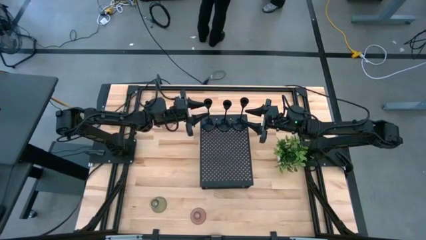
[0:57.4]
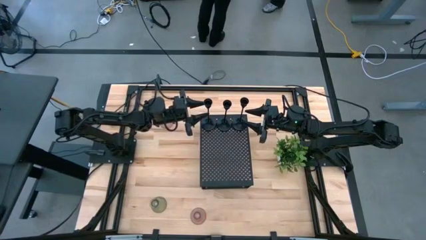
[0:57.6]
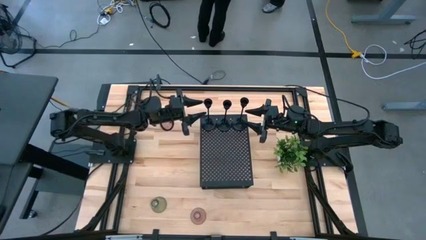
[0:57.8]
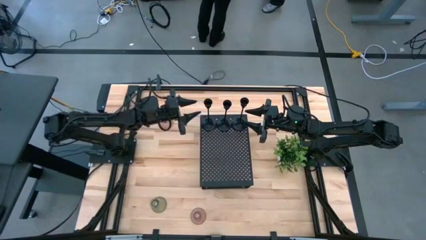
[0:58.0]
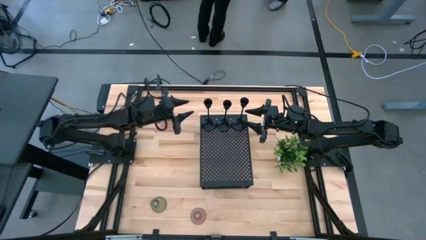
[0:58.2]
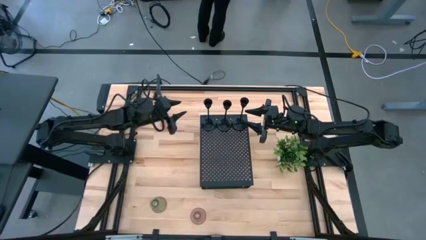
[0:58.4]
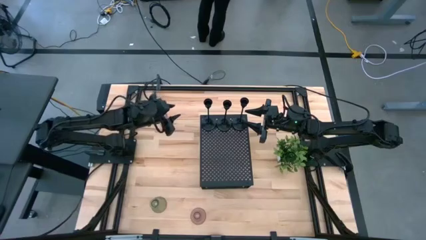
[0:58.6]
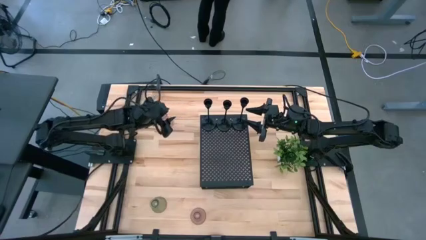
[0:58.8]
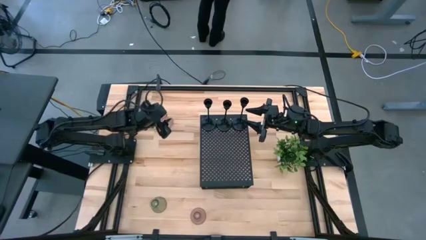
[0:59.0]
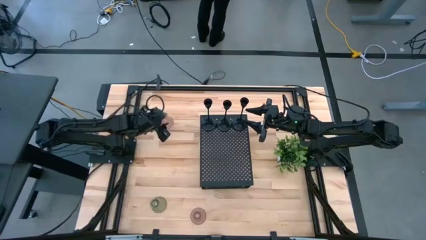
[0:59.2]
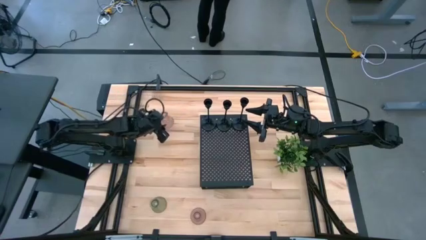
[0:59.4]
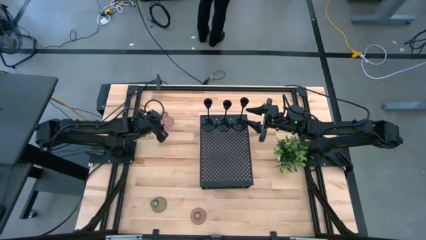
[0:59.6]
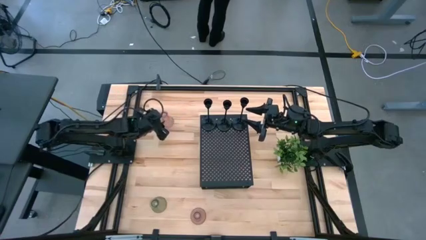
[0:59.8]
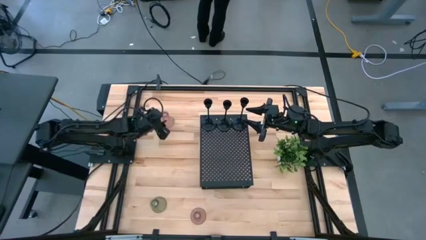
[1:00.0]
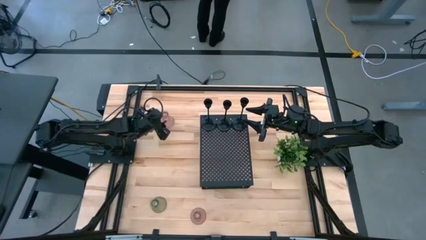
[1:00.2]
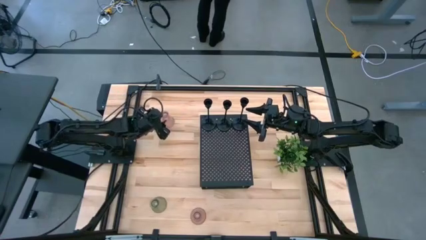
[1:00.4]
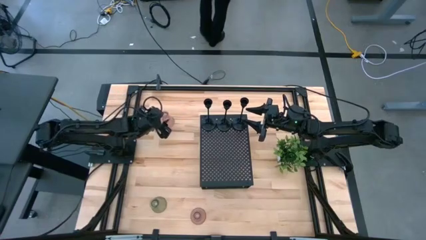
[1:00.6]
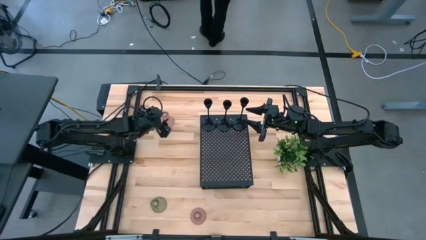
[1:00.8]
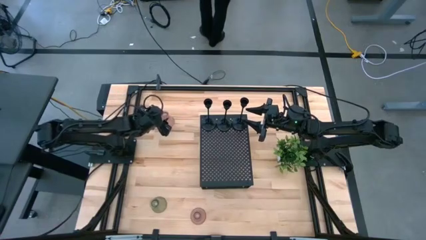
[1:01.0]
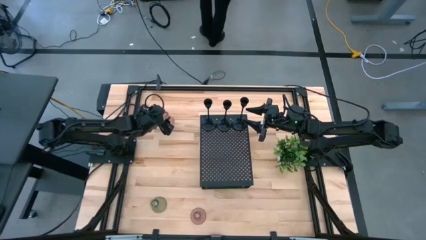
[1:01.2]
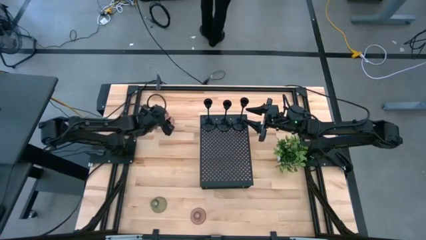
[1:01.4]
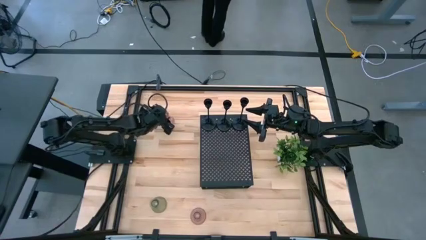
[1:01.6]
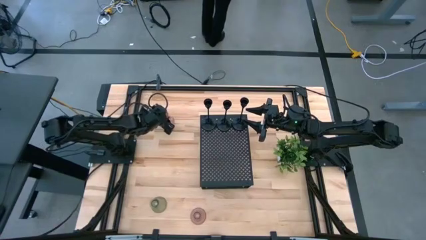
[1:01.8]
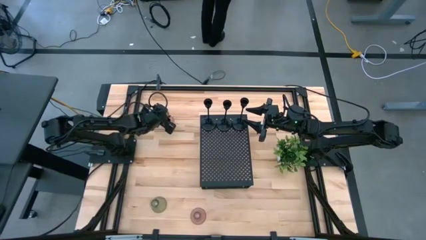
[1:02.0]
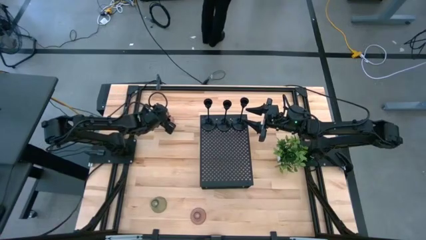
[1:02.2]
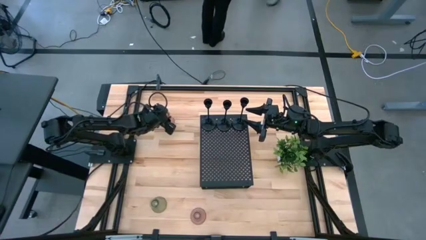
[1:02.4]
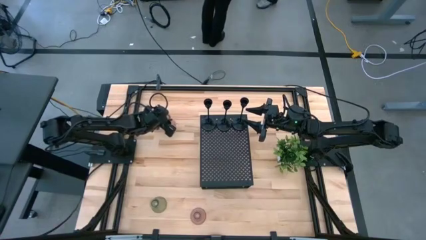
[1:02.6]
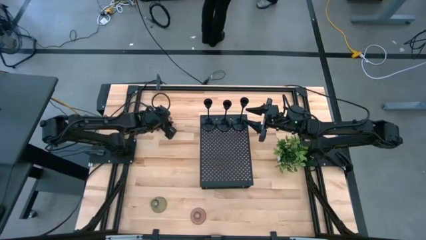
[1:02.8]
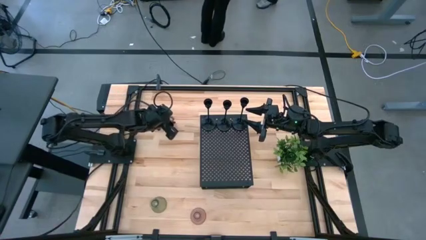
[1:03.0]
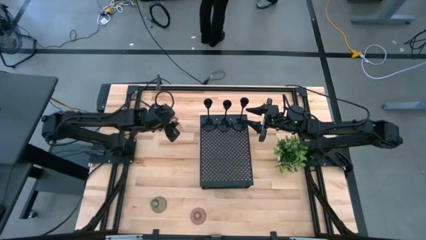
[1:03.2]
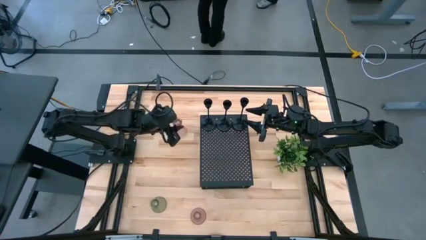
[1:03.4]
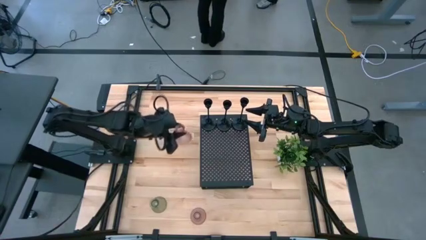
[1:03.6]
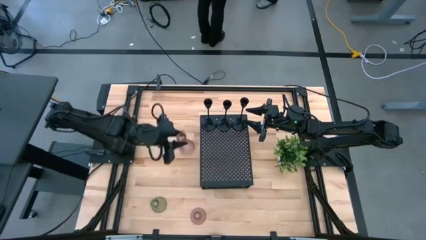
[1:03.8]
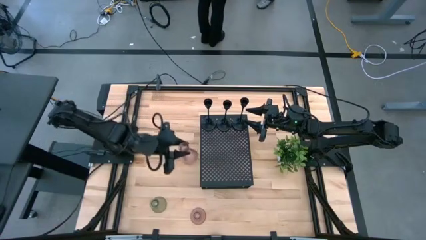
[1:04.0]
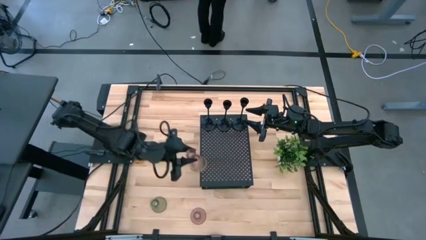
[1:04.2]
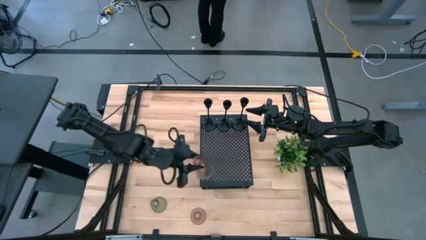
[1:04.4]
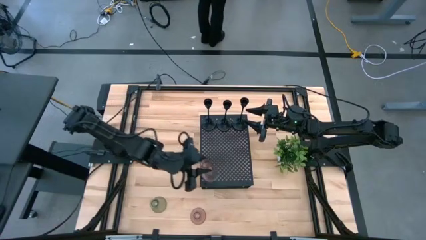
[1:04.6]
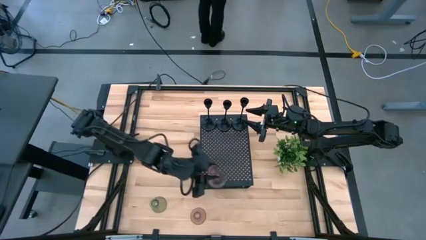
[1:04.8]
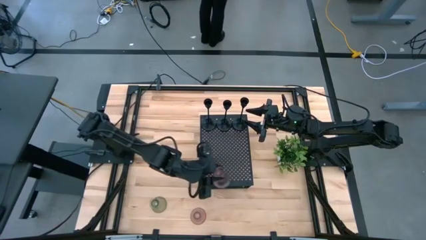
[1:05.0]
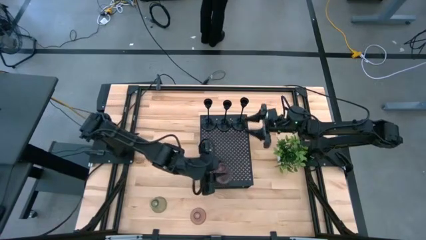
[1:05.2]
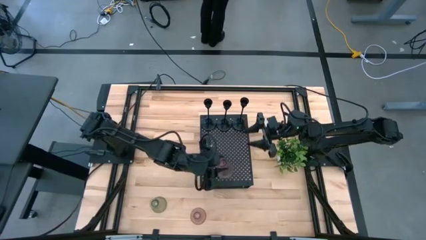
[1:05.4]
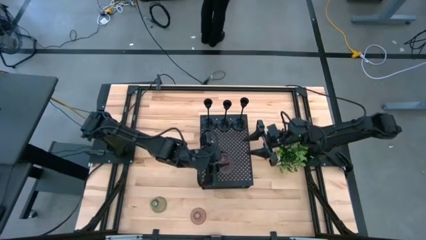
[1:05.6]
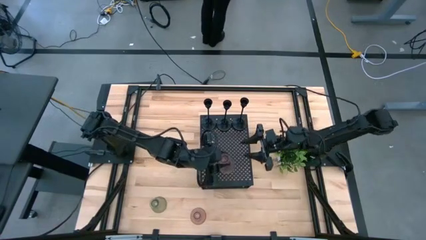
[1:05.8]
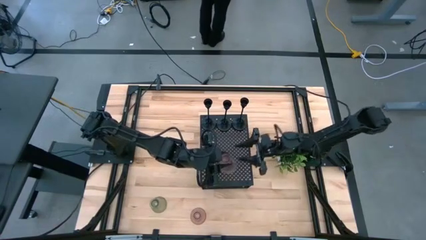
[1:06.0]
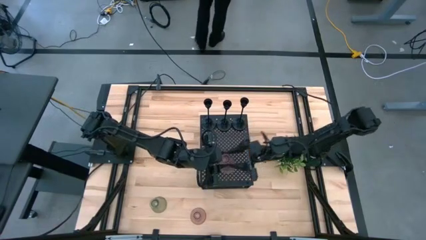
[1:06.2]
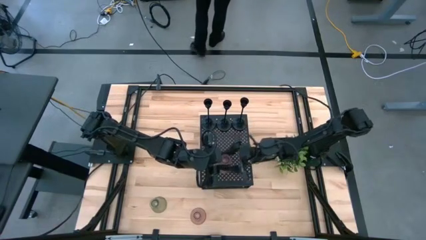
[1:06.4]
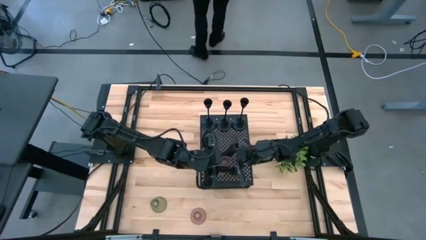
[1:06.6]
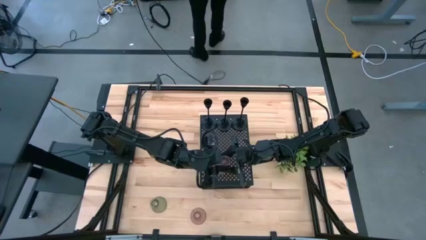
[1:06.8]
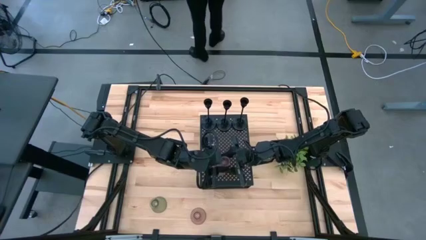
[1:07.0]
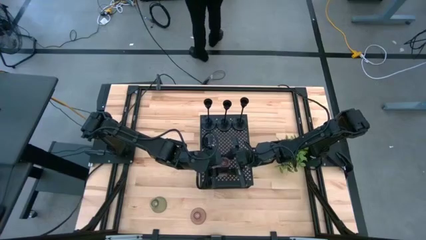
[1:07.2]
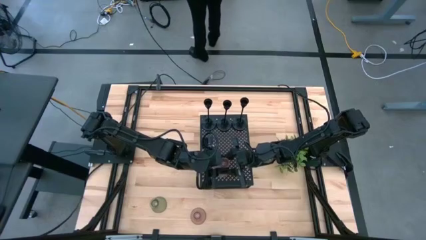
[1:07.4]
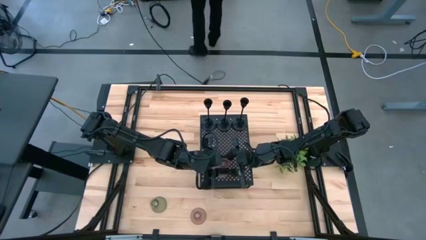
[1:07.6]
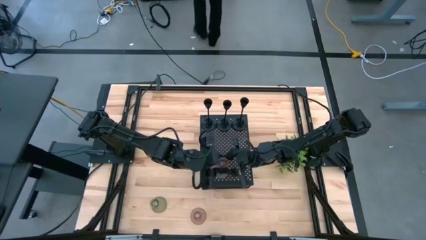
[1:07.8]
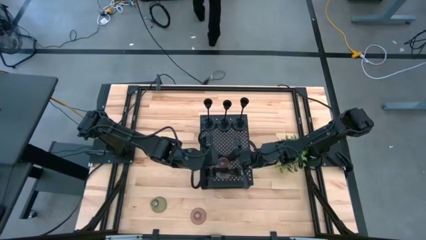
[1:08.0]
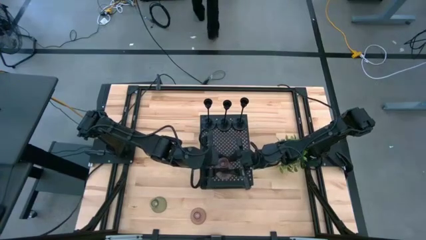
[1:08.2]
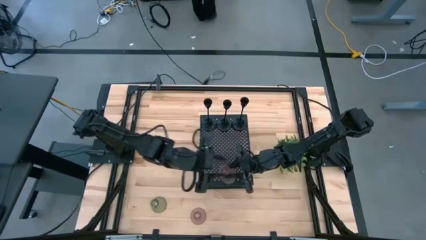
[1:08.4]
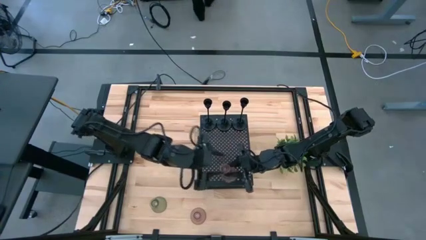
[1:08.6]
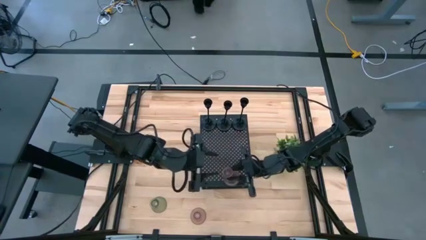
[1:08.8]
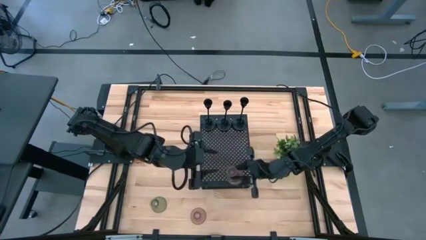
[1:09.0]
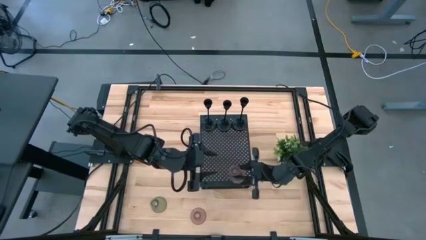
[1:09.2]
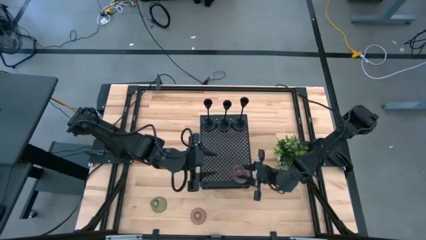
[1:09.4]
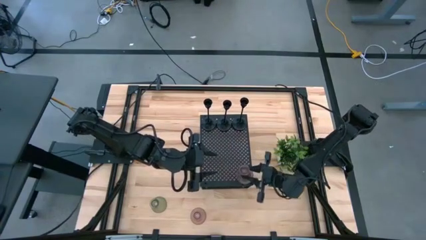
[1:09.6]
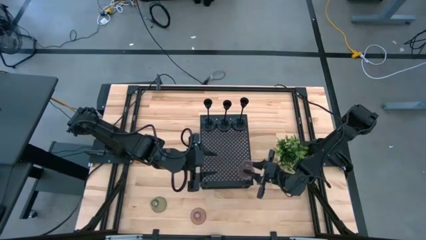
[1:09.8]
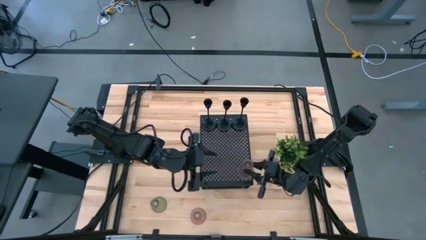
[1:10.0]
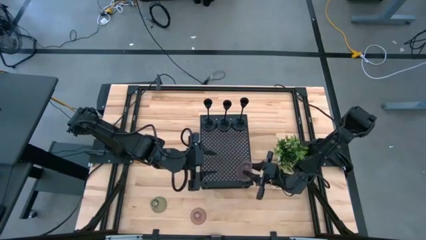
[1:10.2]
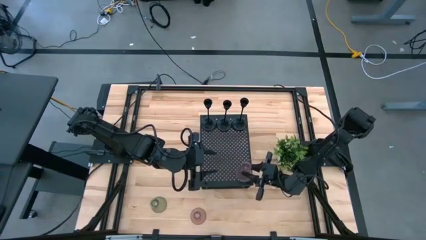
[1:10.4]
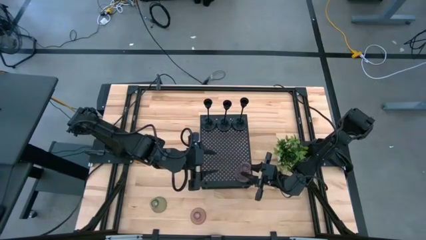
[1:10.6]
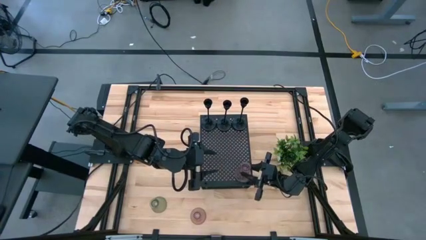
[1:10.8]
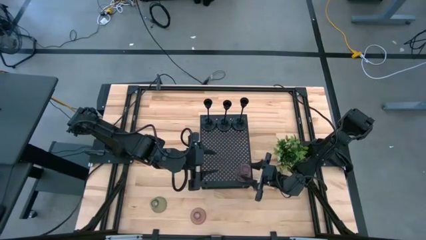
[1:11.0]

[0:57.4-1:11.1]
Task: Pick & Place candle stick holders
Put the top pink glass candle holder on the shelf

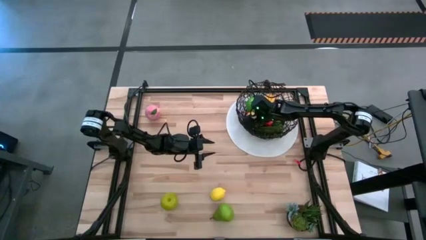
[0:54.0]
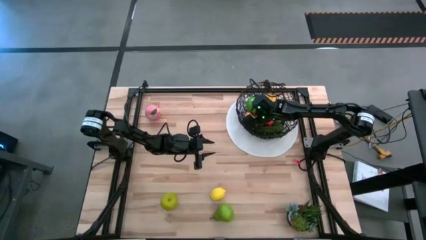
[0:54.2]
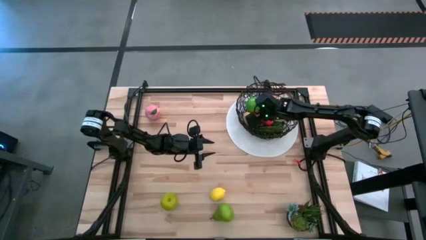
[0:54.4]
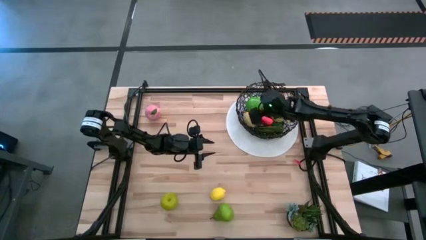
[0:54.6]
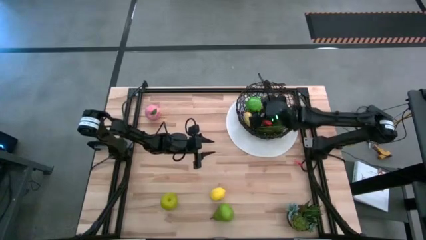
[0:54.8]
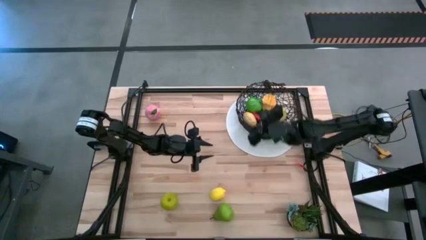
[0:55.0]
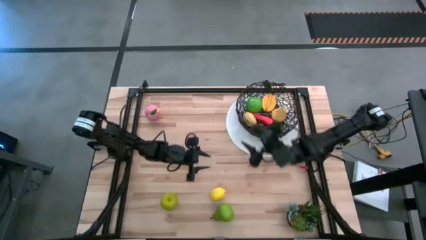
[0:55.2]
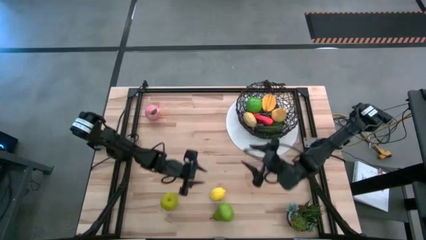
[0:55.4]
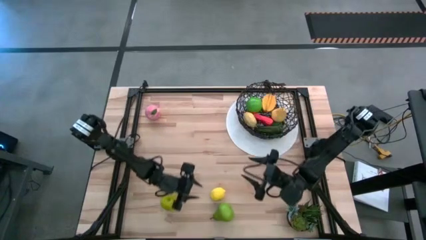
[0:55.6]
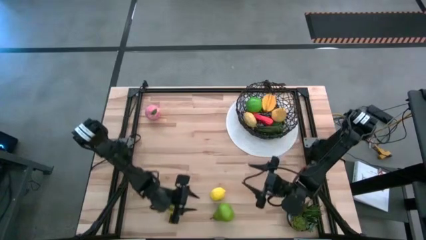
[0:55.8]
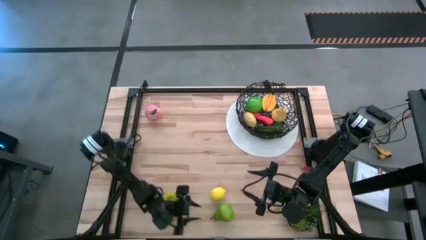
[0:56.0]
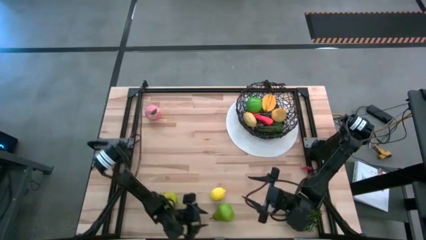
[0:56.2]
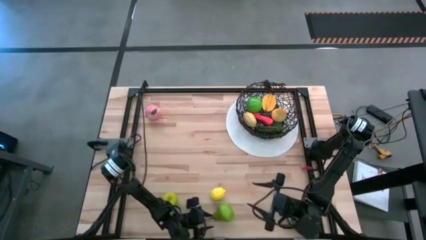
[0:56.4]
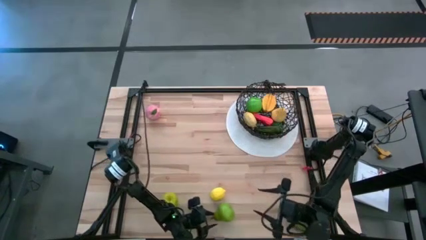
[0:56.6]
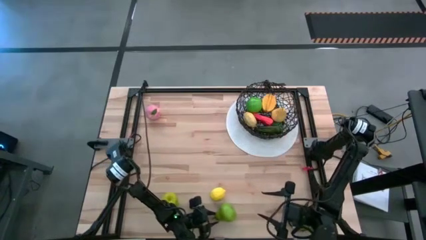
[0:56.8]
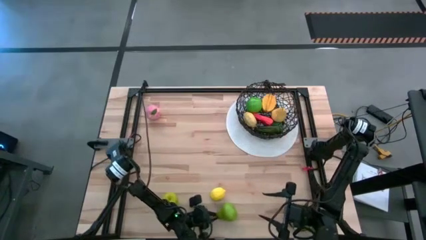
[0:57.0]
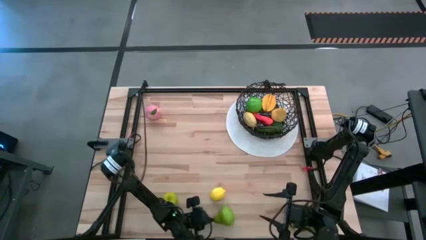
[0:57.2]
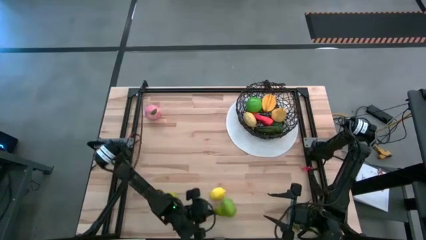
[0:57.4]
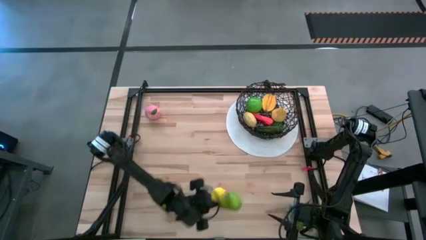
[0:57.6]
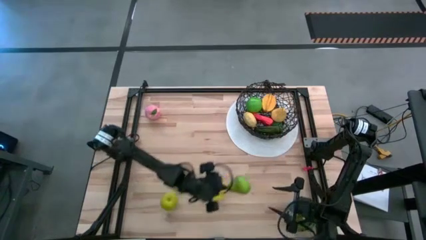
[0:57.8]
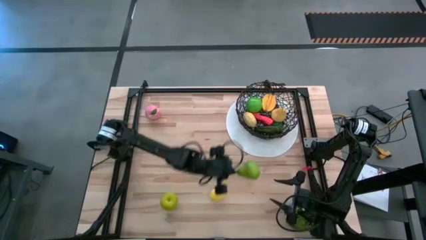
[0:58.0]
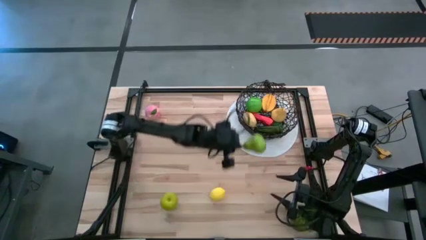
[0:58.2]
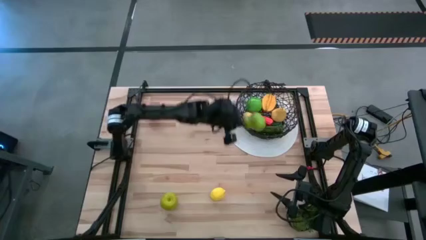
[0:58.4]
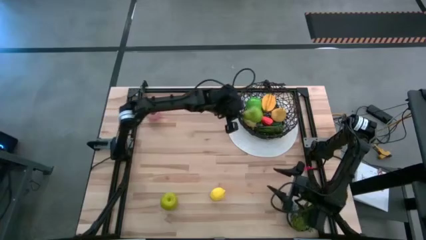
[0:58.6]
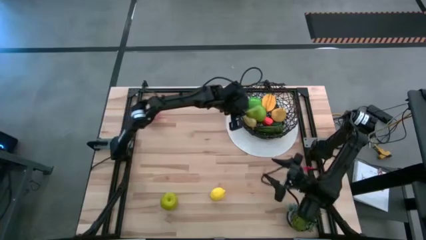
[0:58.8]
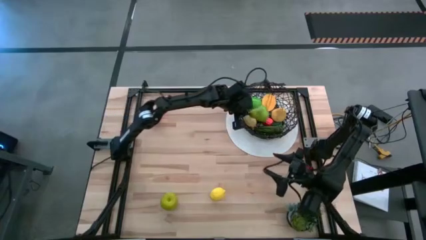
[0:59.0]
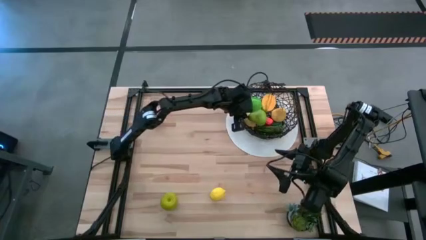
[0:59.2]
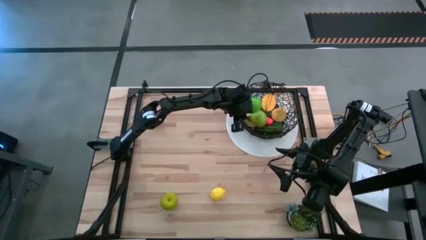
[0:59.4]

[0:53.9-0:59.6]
Task: Build produce basket
Put the green pear into the black wire basket
